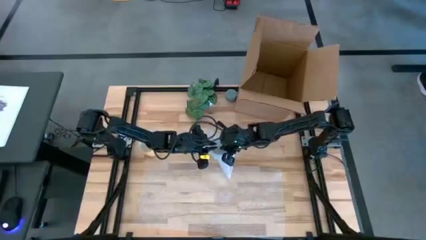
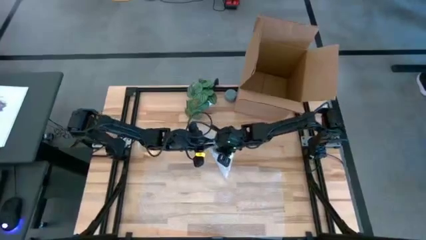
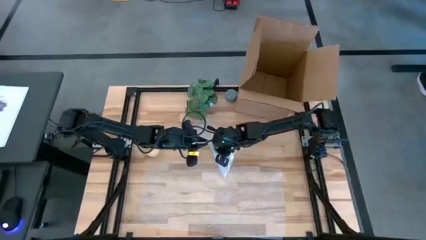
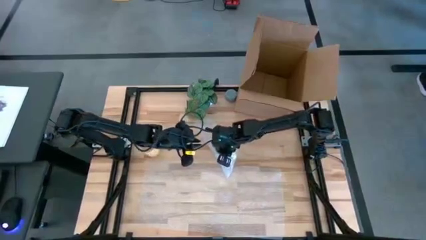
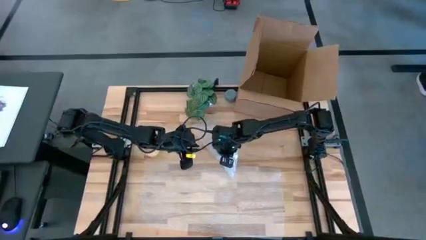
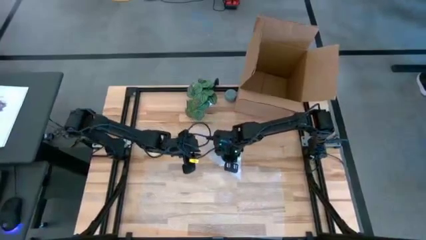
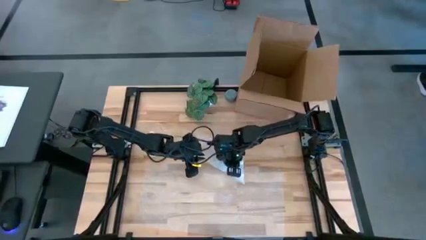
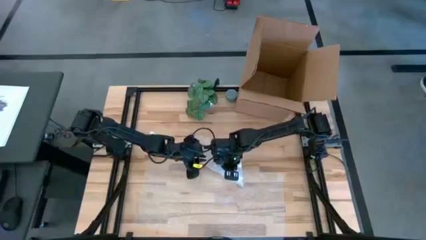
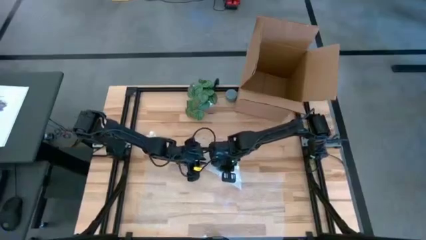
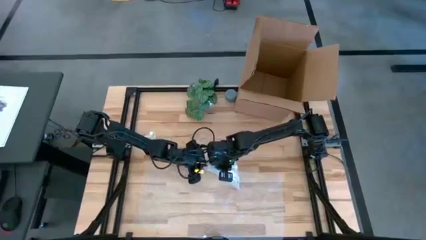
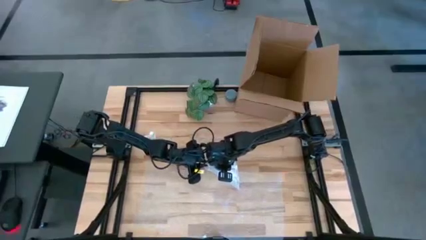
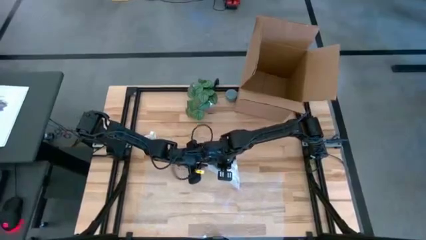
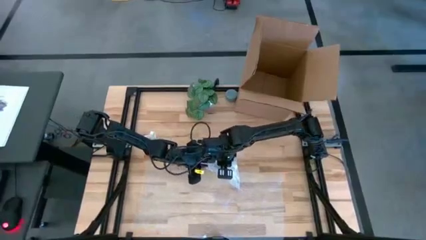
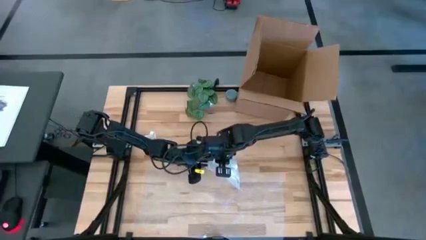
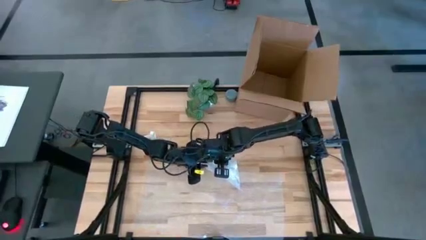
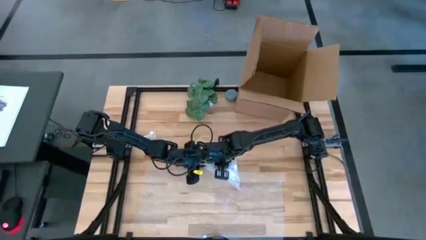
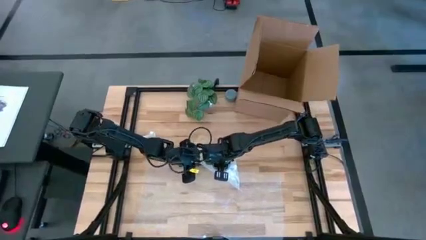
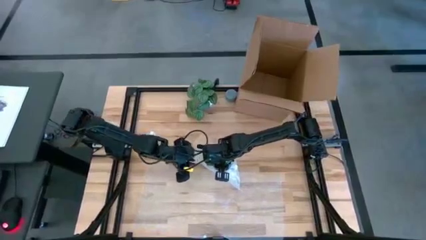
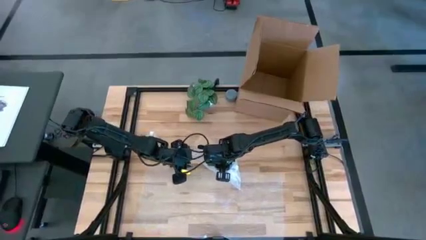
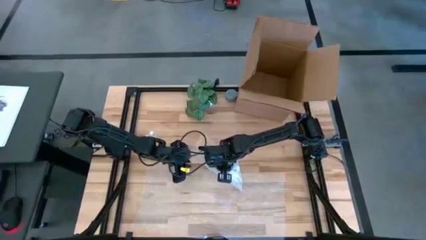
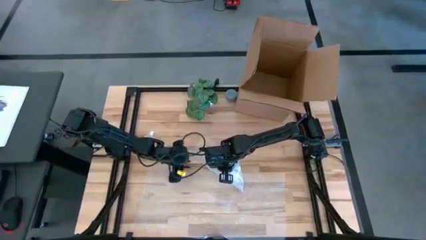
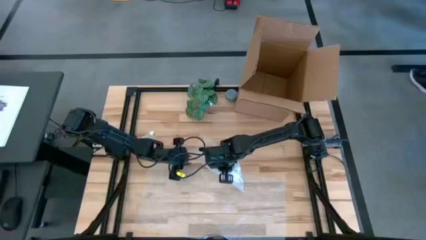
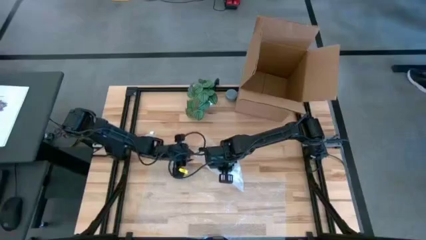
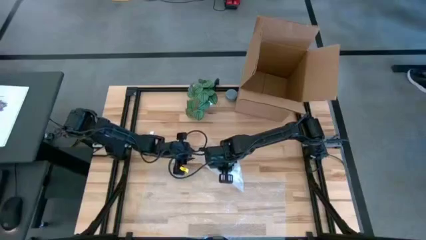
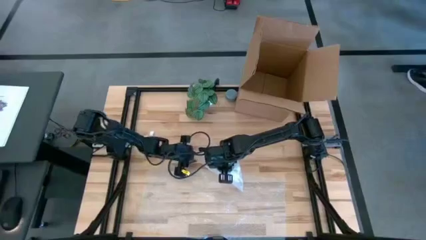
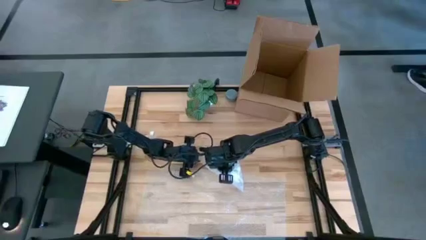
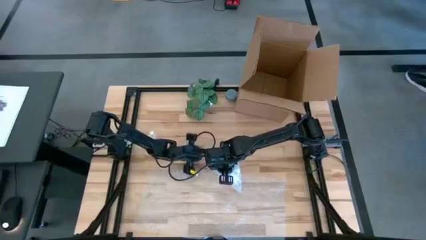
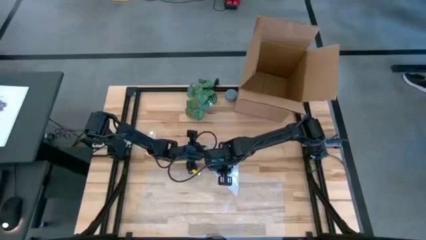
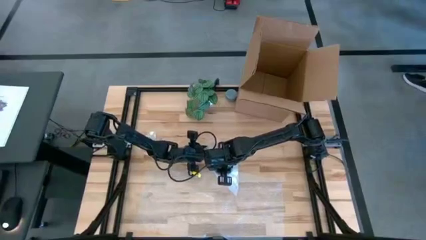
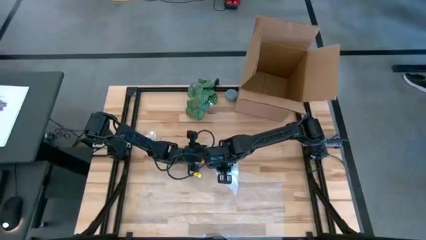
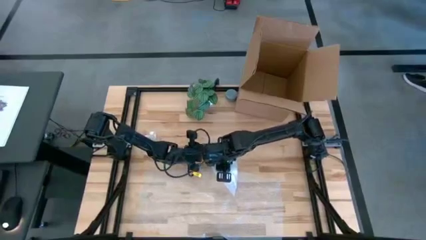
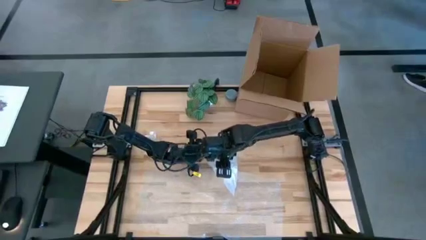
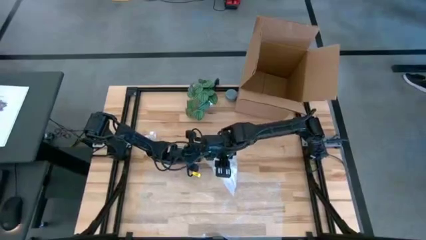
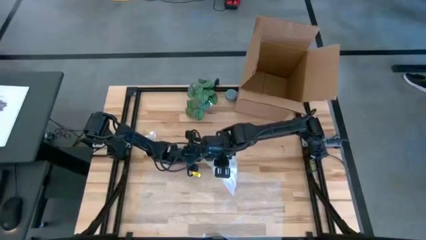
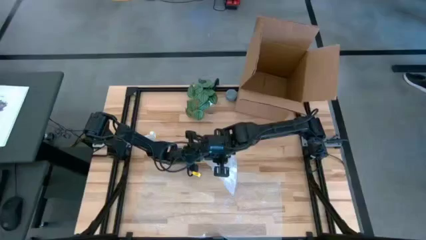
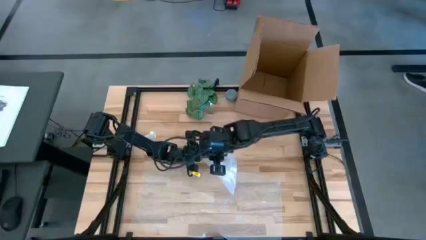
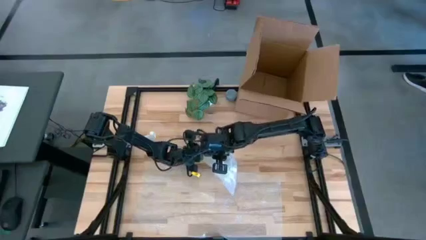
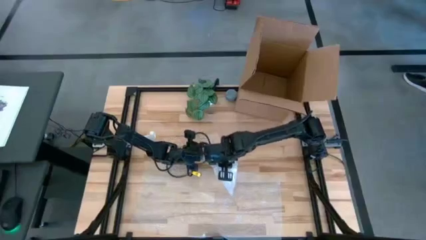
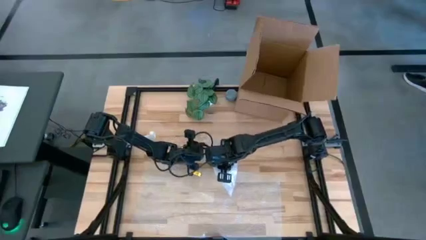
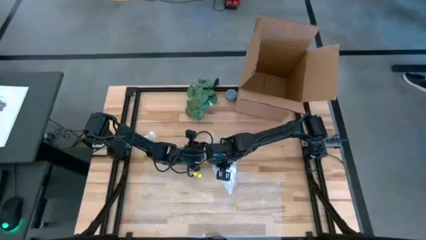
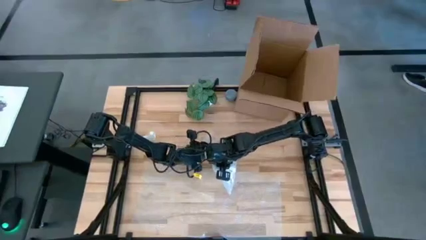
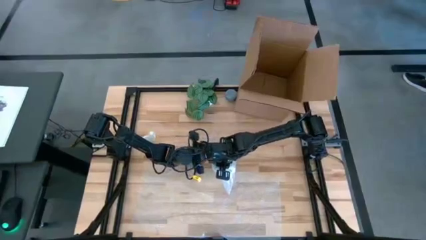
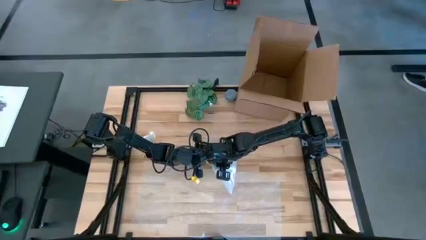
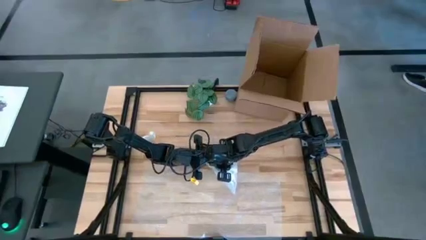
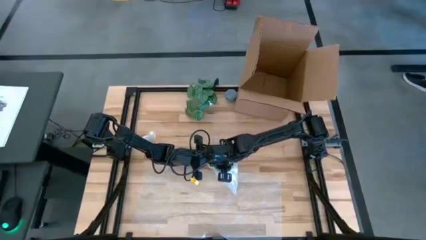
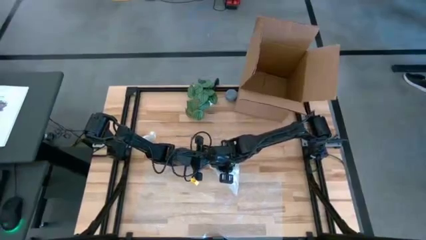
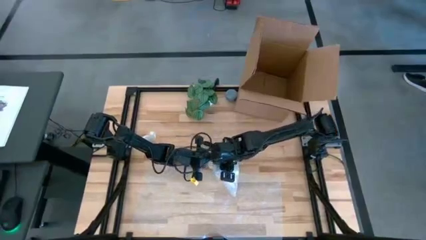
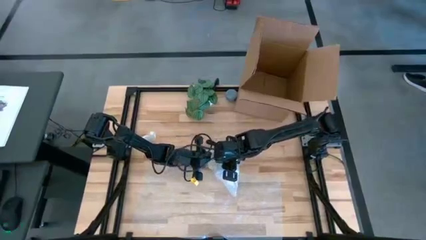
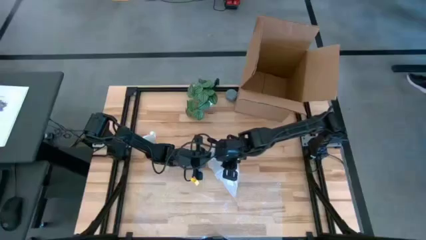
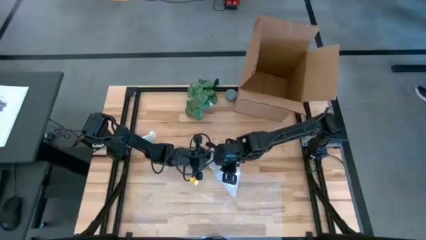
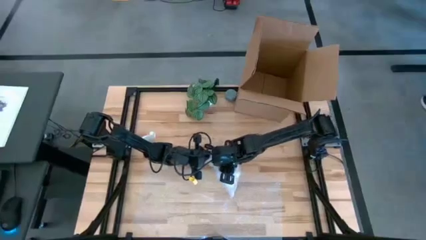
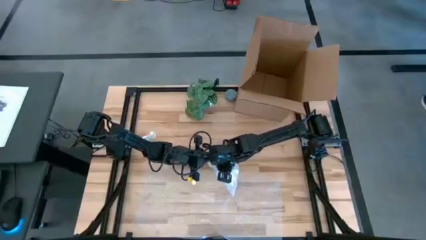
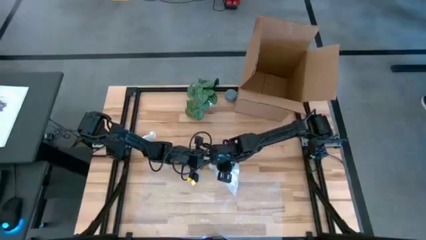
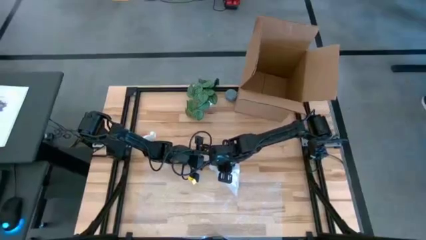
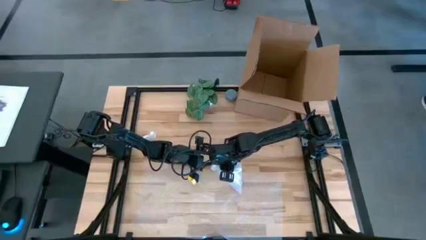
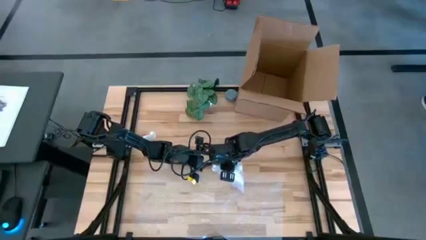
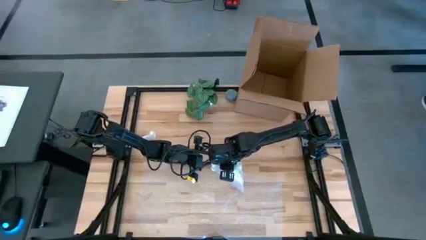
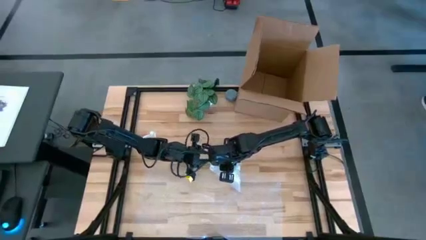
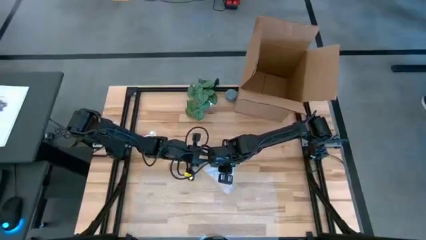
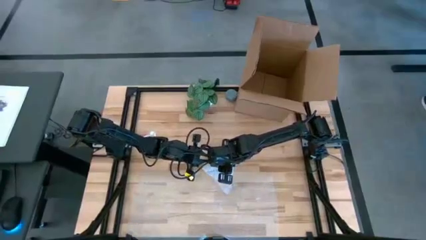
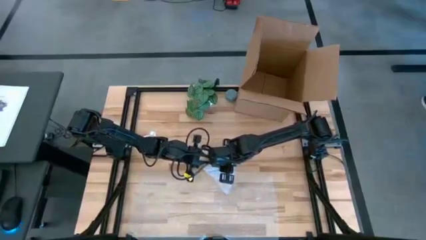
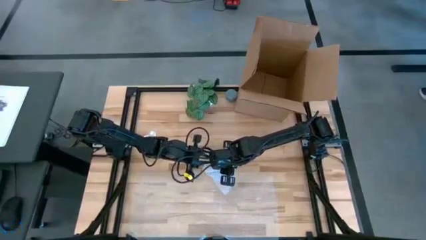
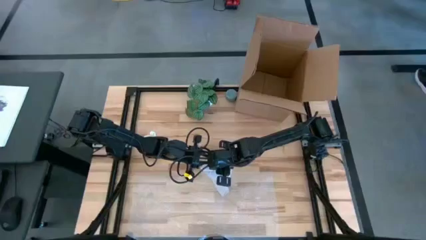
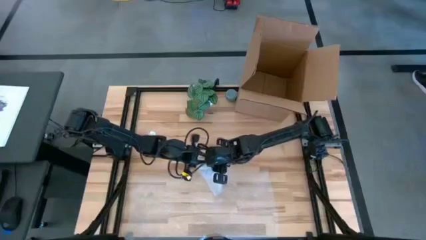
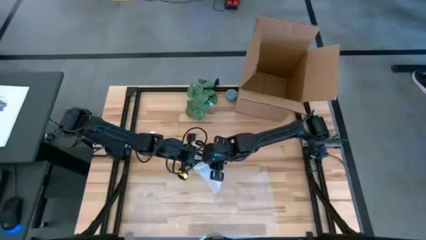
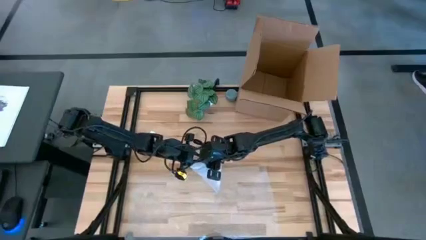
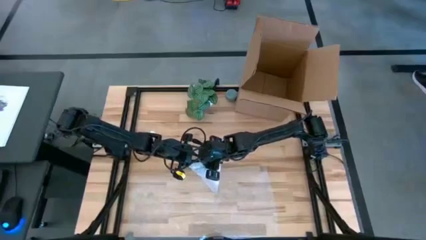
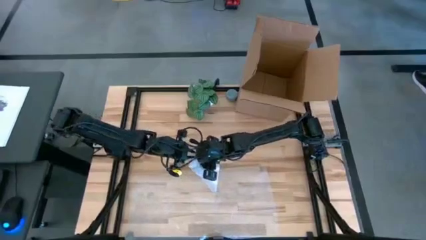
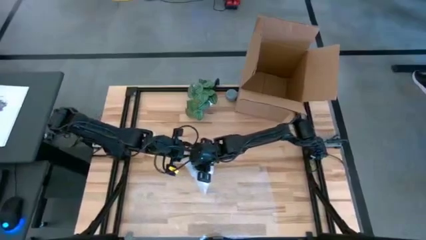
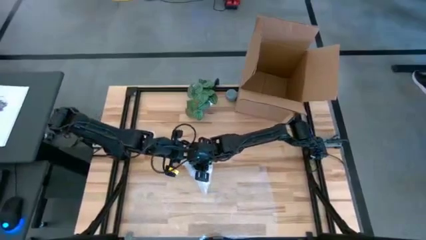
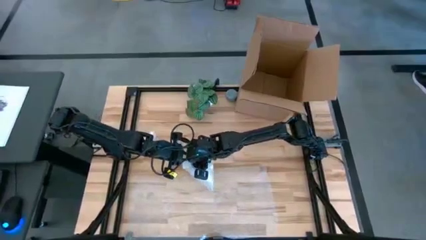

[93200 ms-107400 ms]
Task: wrap mug
Wrap the blue cup with the bubble wrap

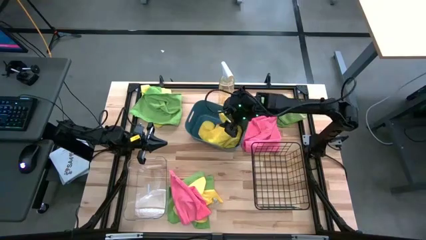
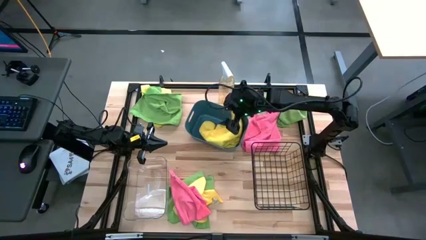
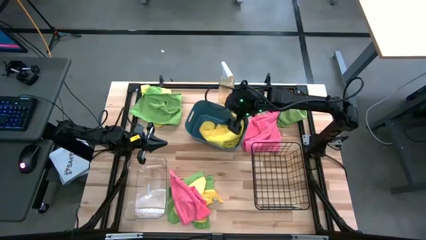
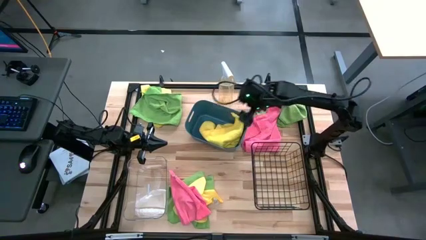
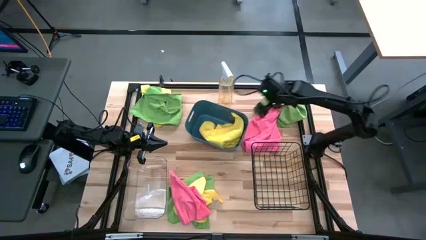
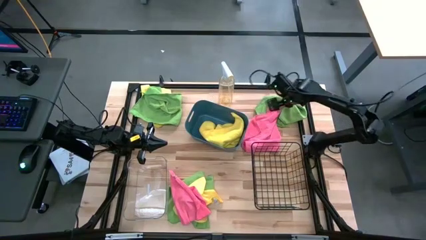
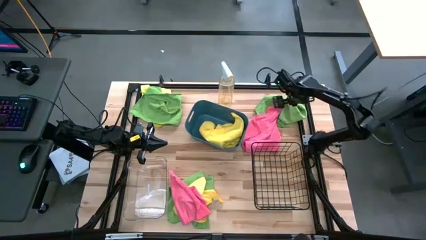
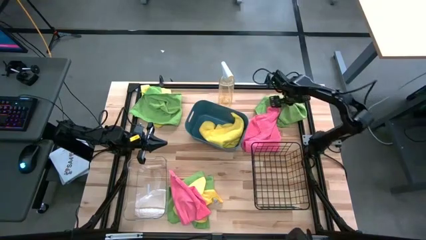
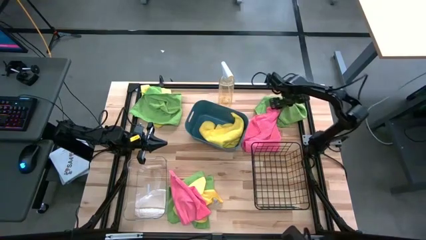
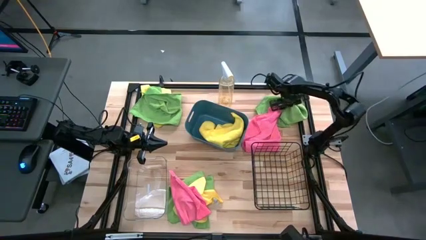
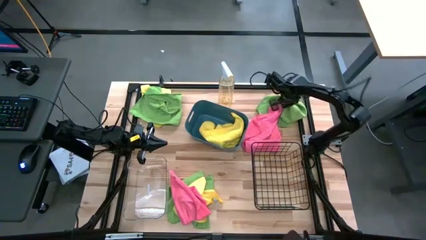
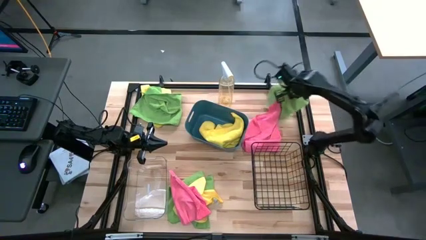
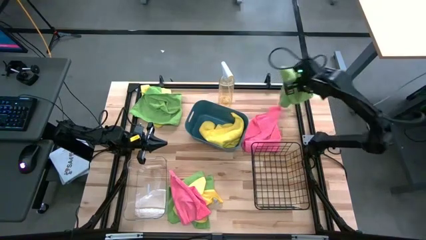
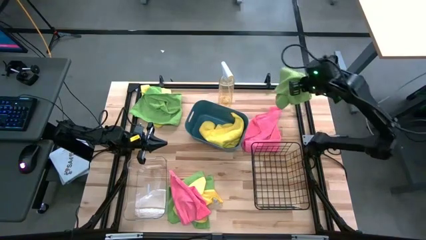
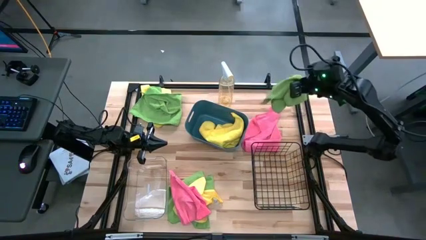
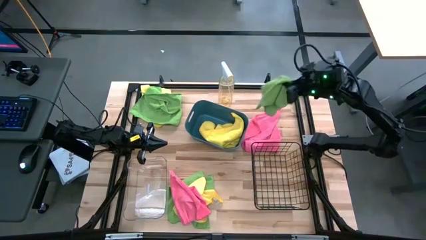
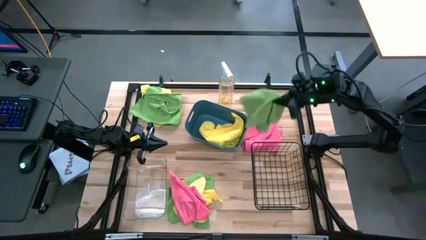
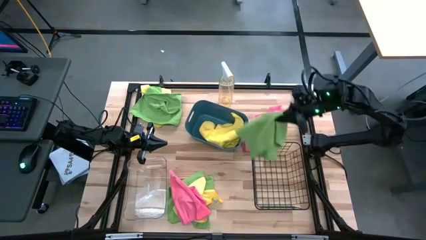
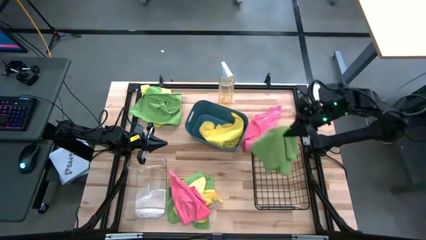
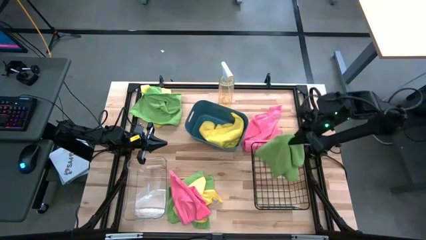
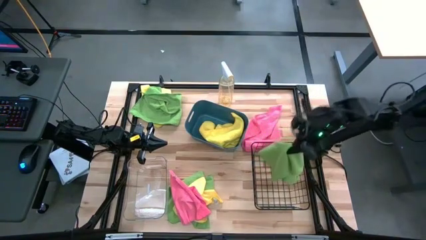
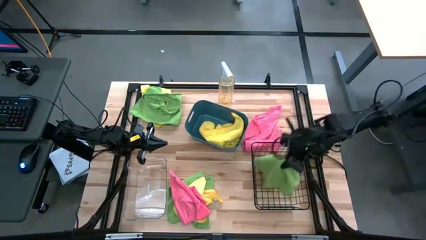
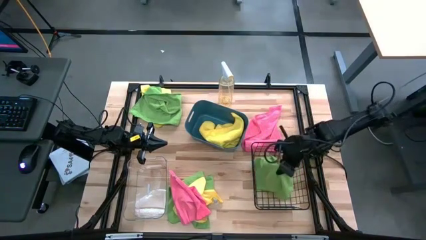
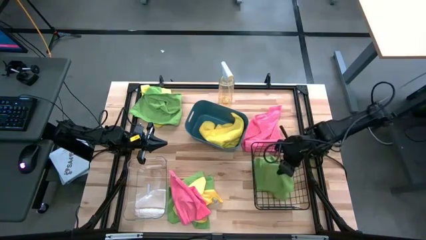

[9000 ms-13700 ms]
Task: Sort microfiber towel by color & place in baskets
Put the top right green microfiber cloth into the black bin
